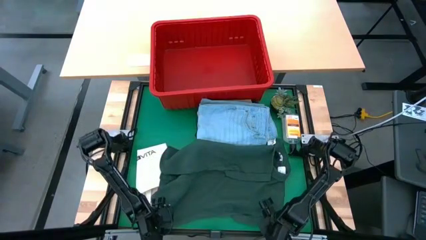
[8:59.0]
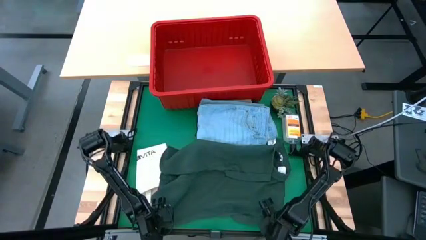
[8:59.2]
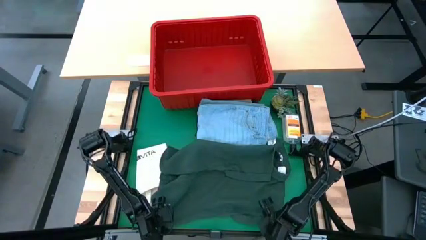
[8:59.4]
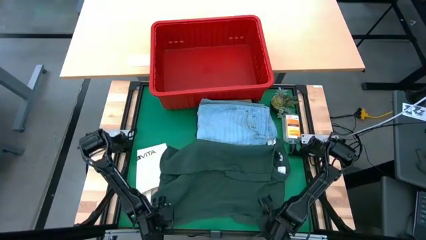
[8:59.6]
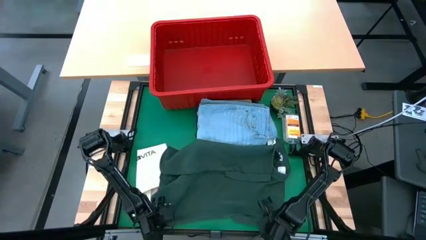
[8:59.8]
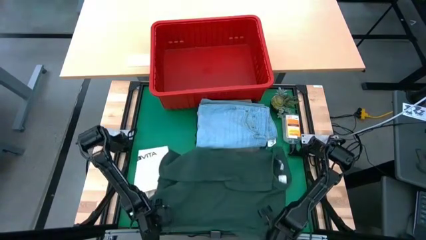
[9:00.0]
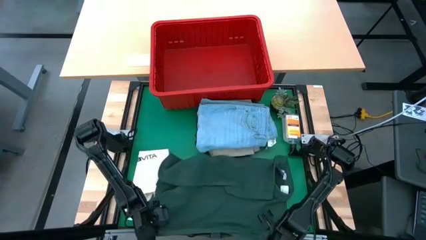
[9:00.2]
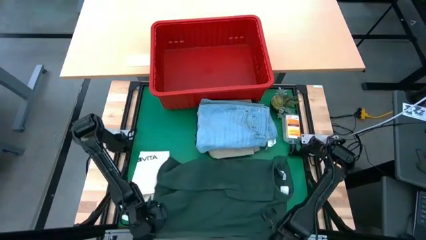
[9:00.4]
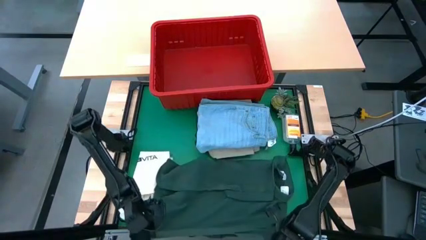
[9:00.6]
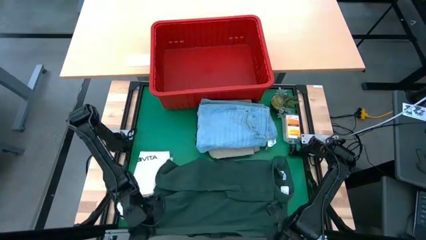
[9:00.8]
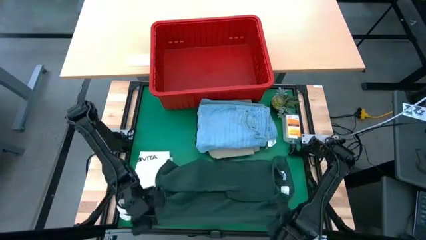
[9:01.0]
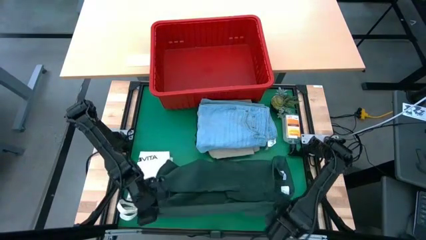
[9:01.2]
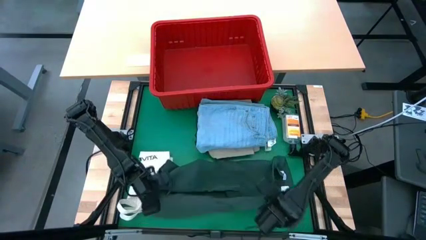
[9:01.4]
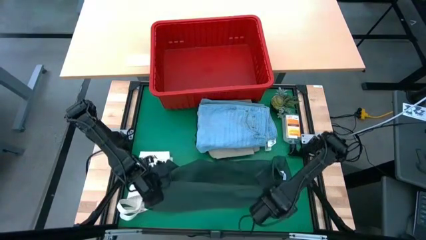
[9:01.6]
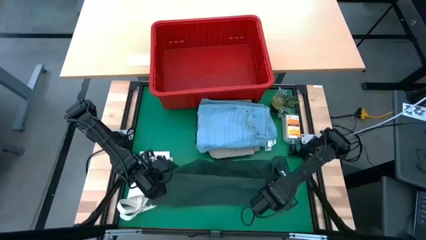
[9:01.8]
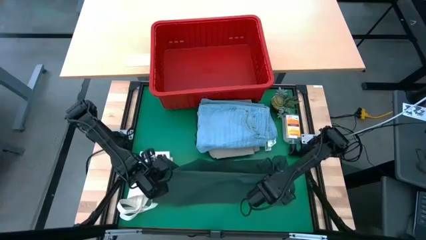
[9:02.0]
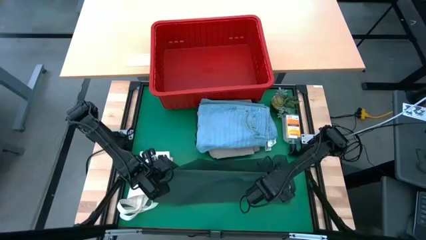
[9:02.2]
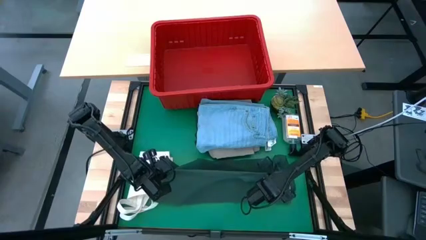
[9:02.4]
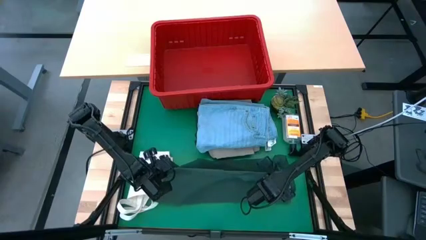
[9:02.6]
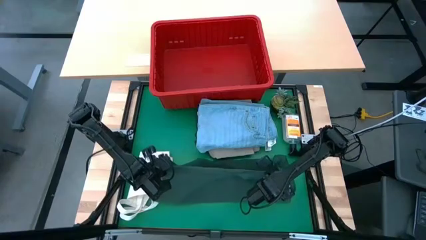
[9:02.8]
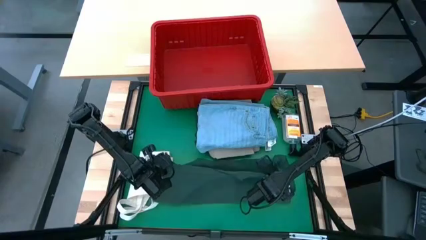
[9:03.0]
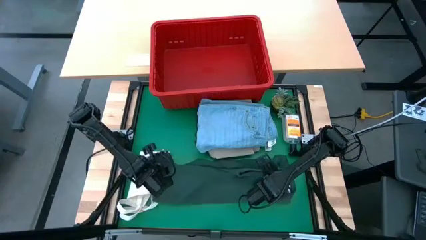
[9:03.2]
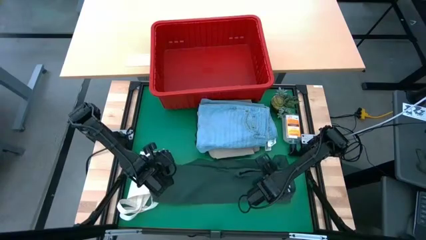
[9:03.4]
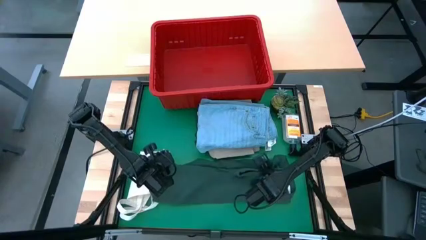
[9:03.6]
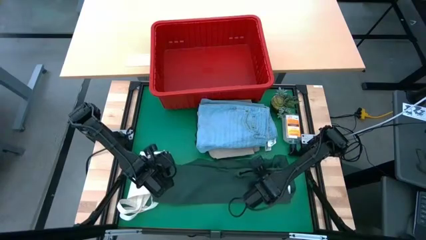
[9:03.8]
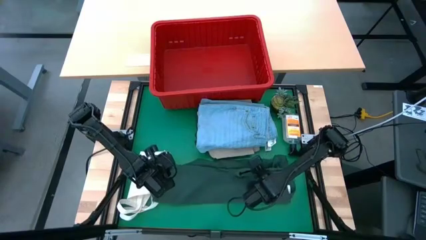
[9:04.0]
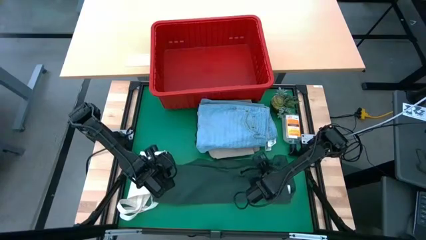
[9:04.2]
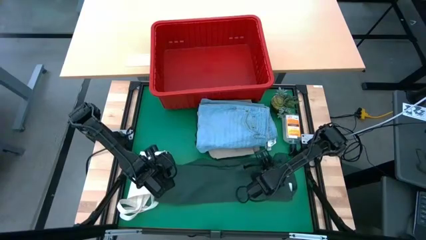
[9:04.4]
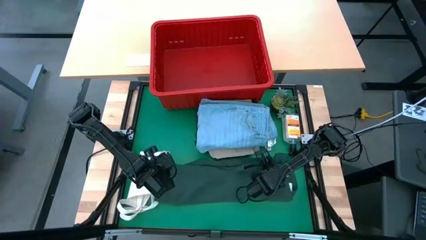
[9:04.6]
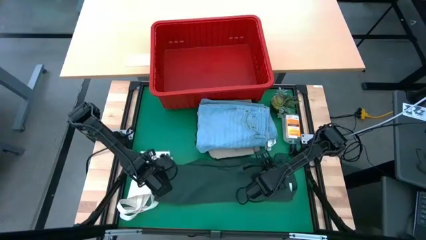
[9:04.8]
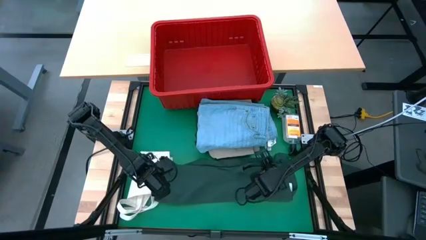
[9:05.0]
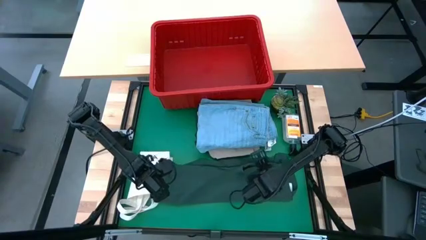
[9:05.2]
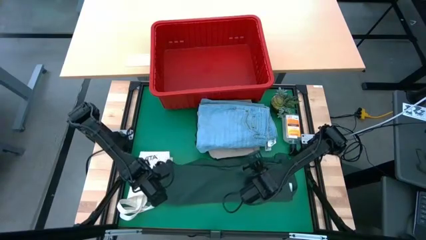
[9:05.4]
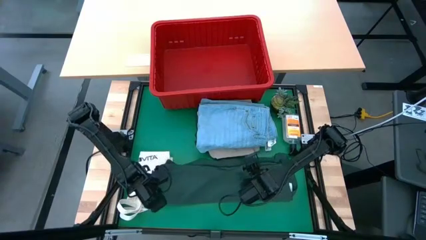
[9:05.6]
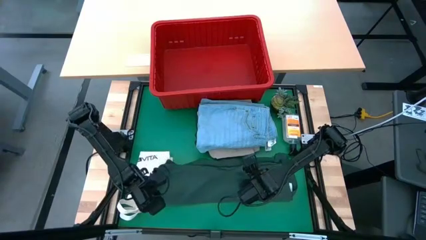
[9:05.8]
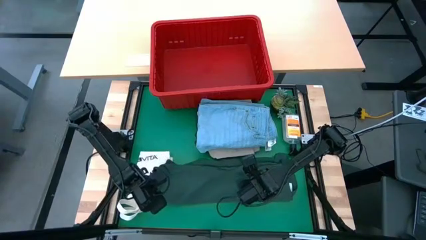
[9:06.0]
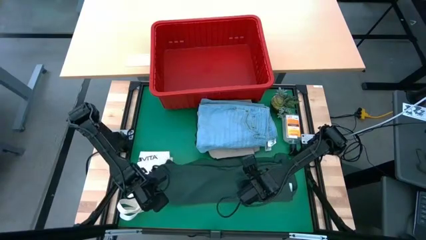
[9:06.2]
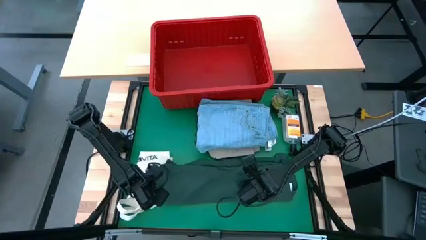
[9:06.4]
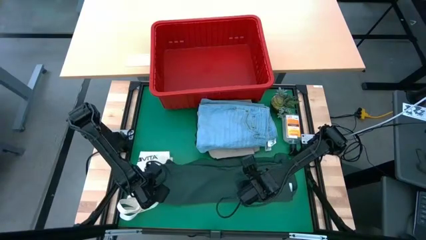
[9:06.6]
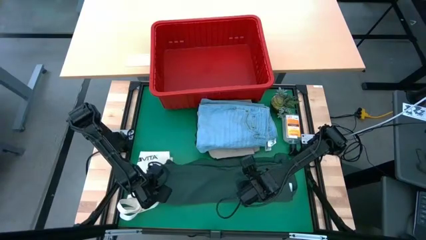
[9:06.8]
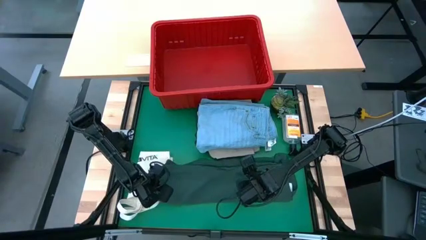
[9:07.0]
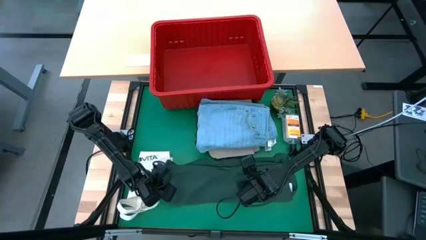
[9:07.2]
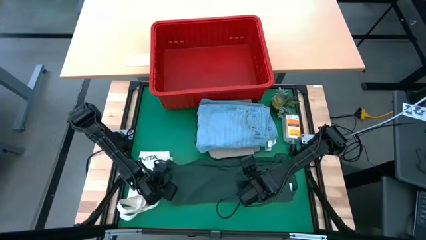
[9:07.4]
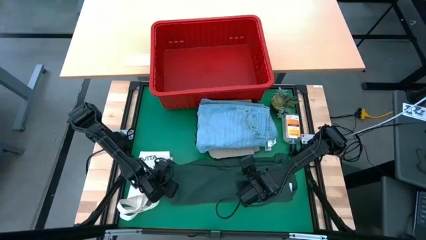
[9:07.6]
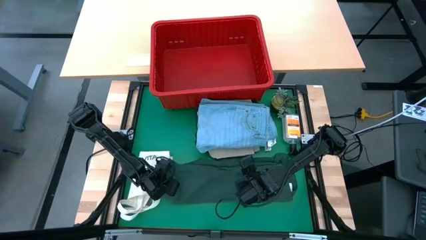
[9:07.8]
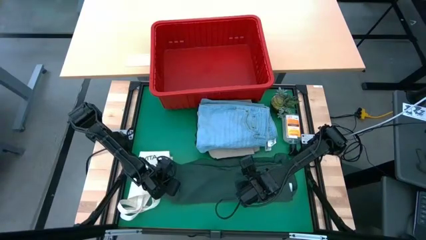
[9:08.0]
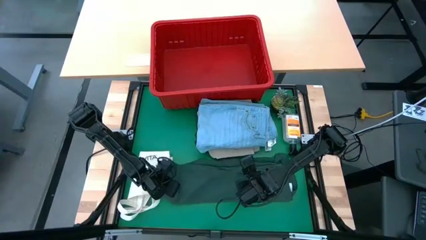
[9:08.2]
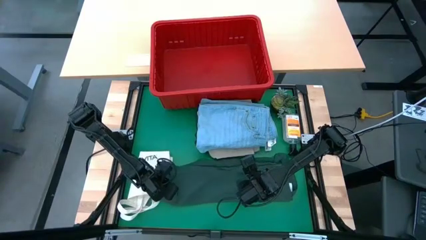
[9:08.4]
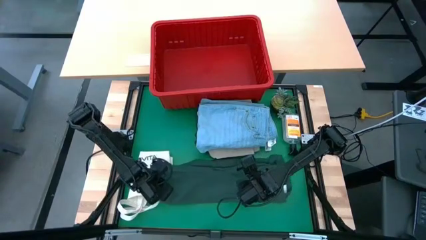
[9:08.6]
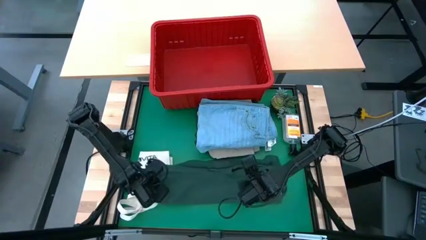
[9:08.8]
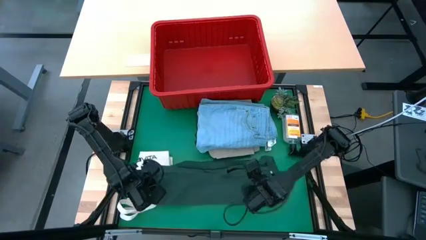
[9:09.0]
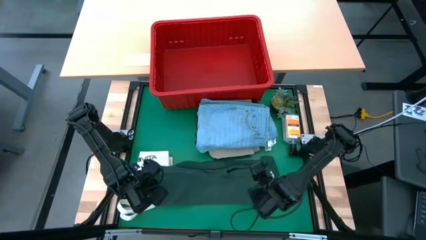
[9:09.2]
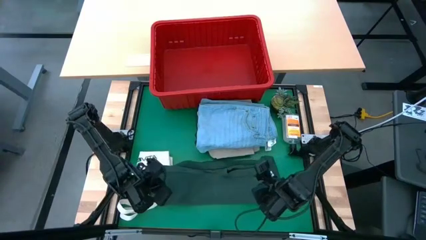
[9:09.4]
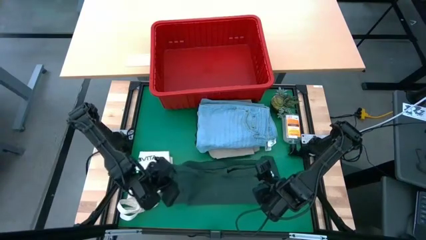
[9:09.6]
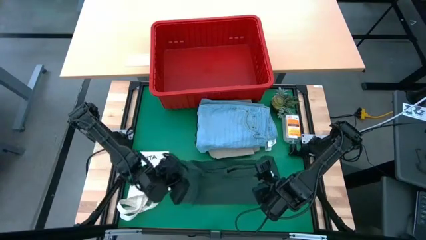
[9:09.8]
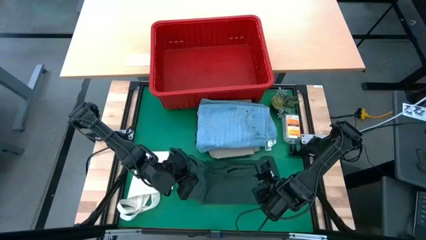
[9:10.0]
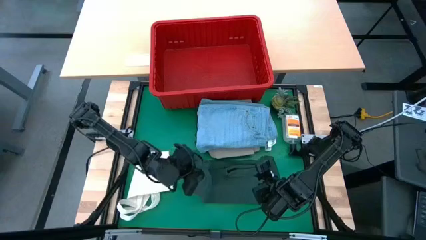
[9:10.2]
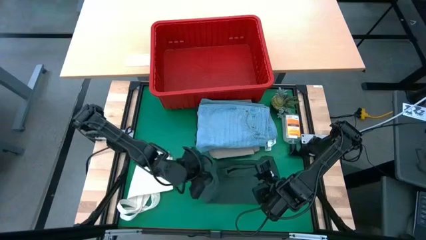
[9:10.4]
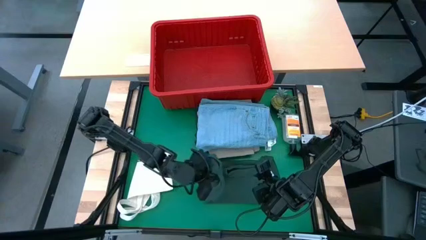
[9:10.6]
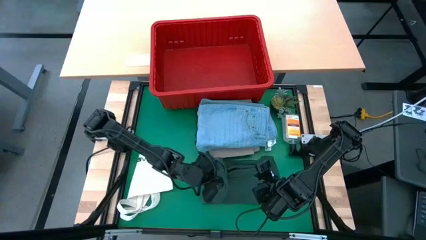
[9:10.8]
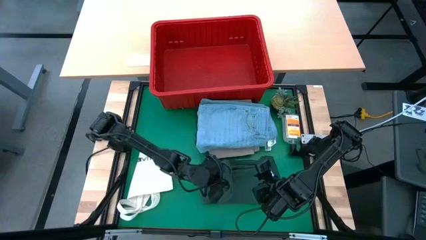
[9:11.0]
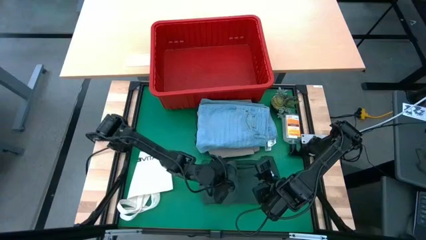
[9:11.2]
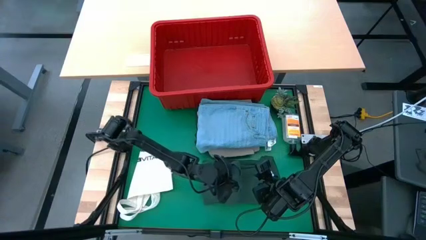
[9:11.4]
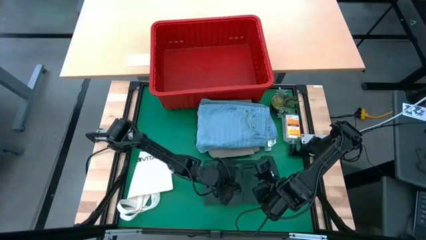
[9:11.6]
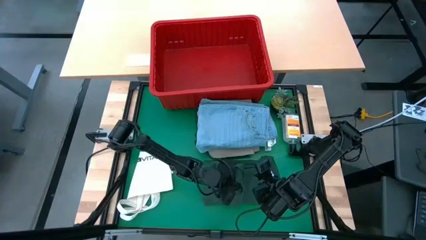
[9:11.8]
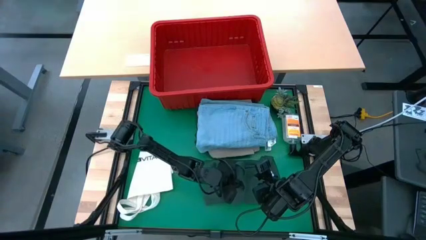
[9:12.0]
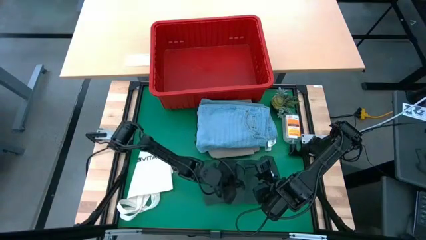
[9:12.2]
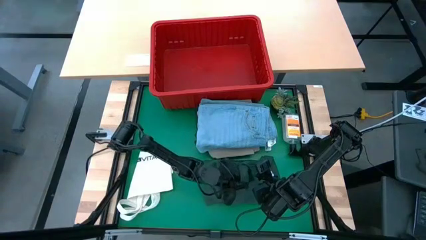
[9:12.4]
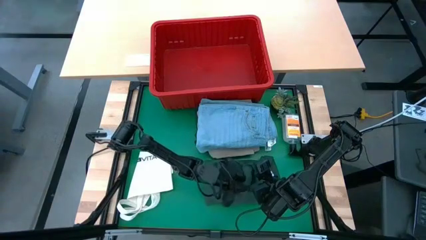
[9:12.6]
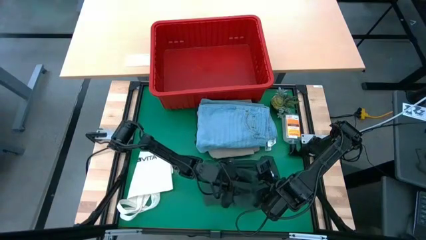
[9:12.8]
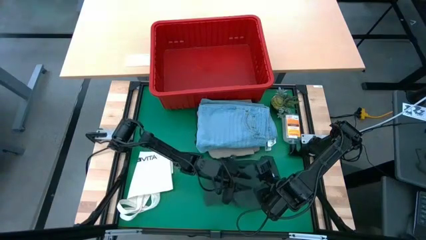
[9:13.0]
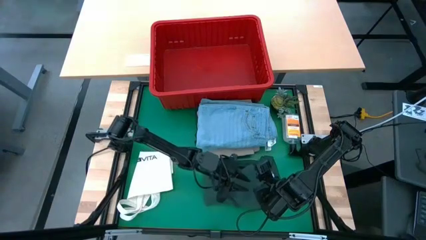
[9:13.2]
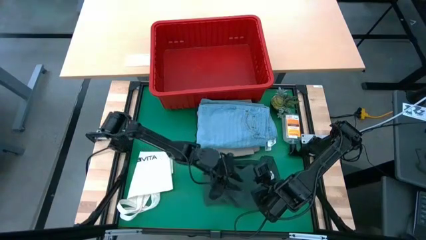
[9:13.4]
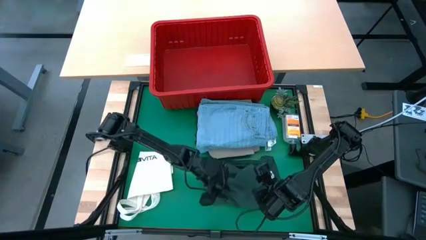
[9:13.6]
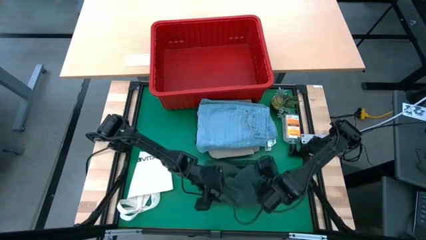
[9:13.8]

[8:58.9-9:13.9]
Task: Fold laundry
Fold the green polo shirt

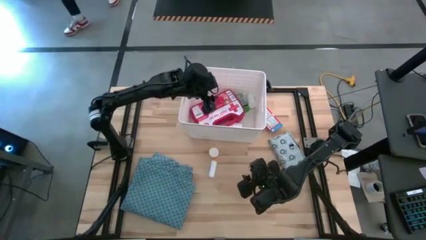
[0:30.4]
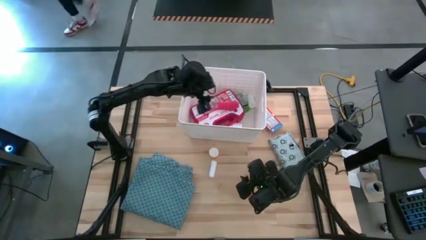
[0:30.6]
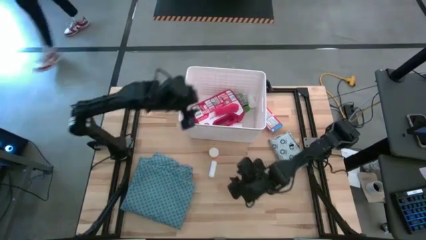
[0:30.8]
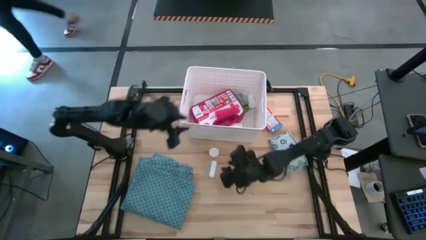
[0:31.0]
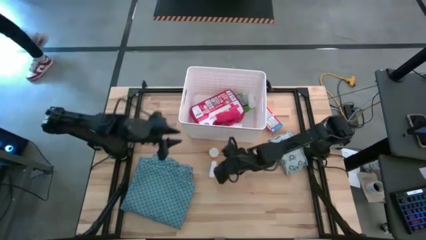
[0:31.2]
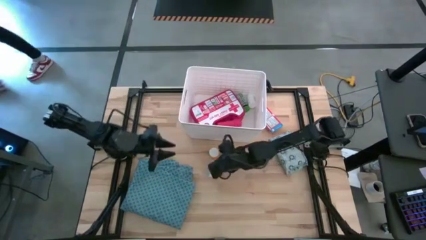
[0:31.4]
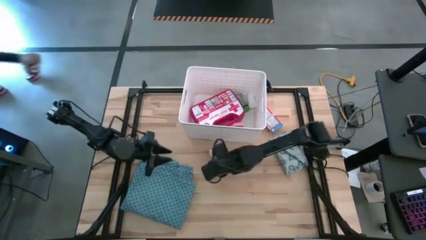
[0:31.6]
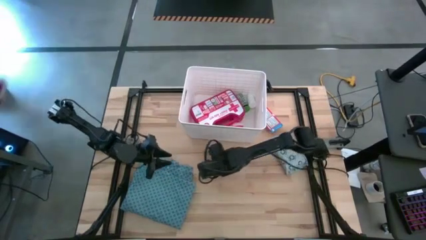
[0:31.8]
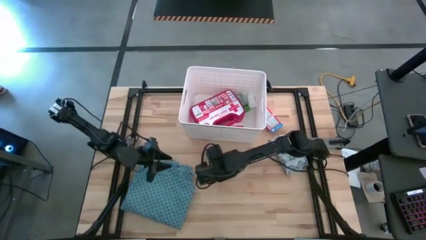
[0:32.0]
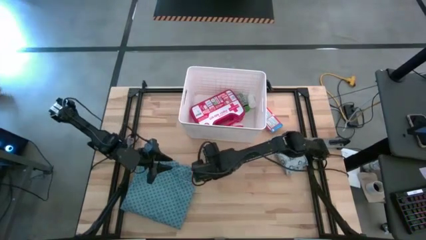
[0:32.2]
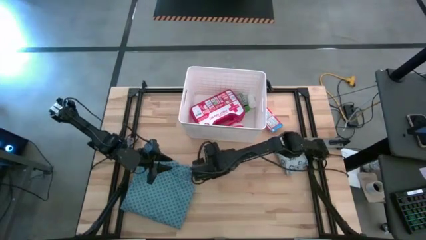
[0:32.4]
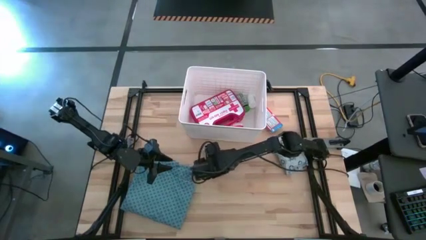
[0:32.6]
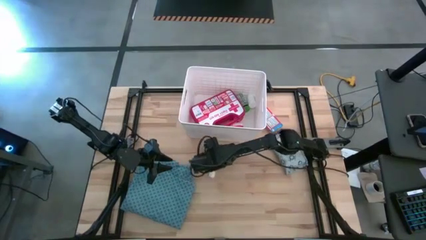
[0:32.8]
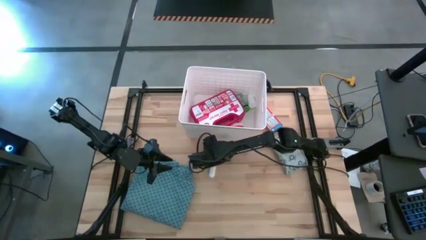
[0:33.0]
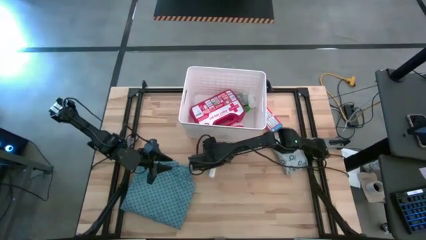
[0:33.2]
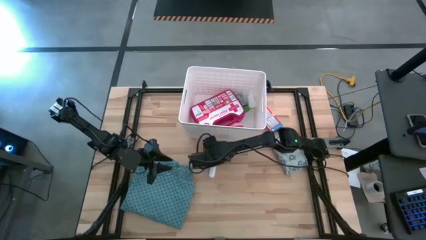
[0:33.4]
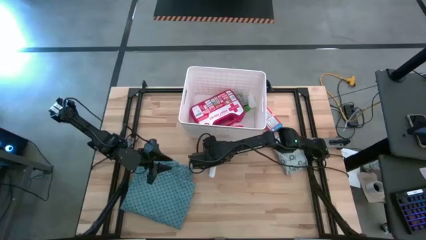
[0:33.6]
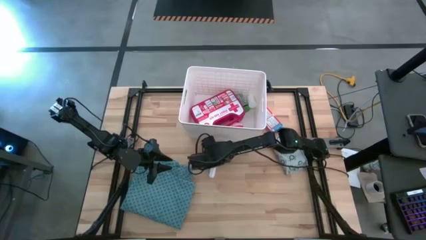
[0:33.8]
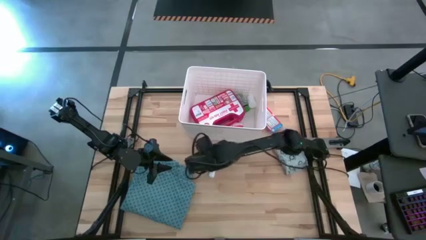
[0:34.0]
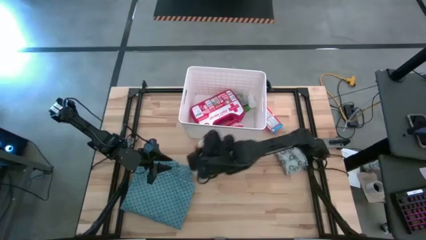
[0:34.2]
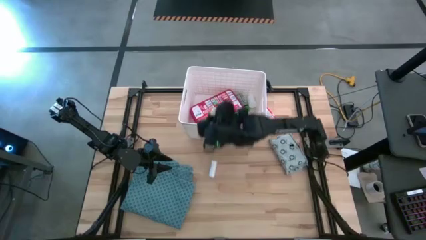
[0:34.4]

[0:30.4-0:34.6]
Task: Pick & place medical supplies in basket/bin
Put the orange pill bottle into the white bin
